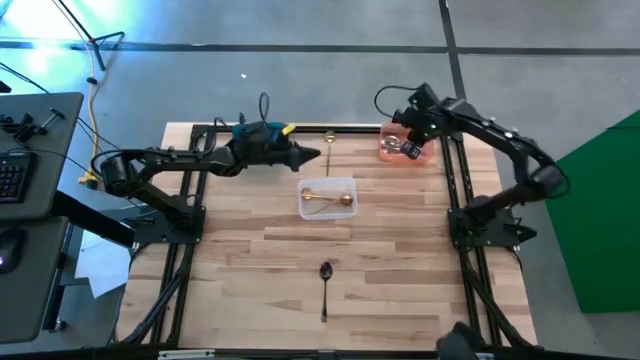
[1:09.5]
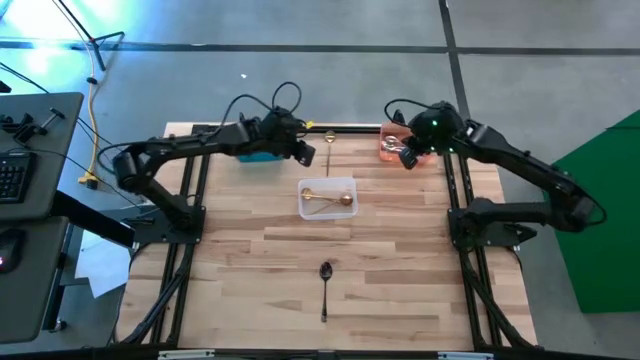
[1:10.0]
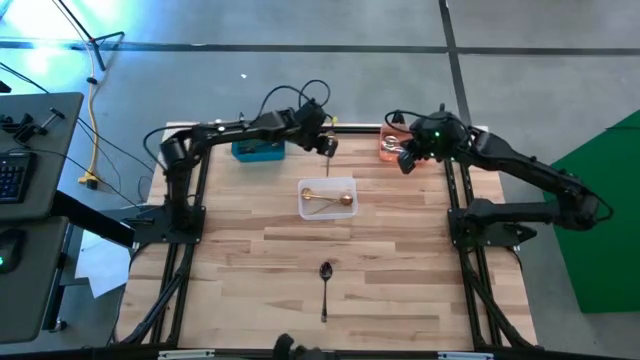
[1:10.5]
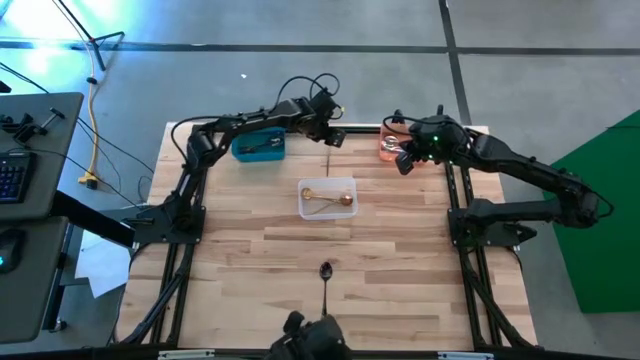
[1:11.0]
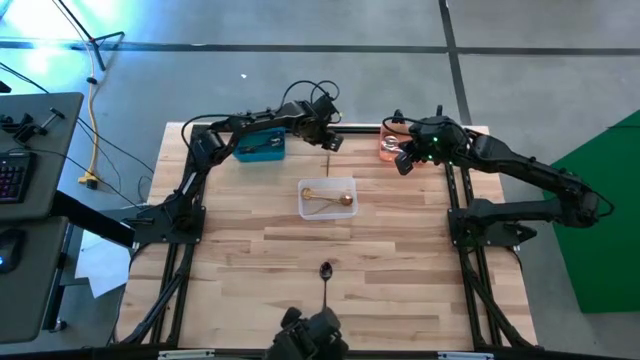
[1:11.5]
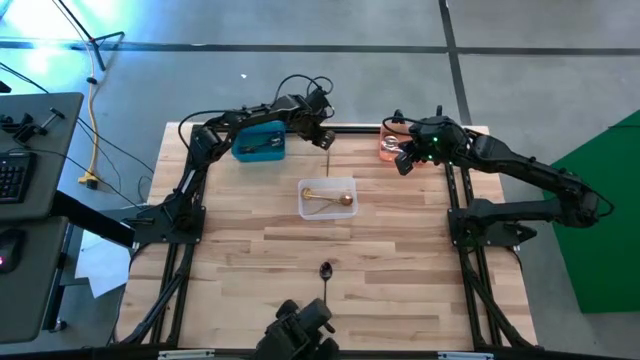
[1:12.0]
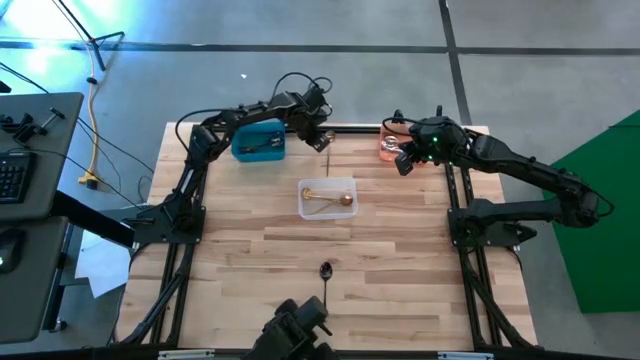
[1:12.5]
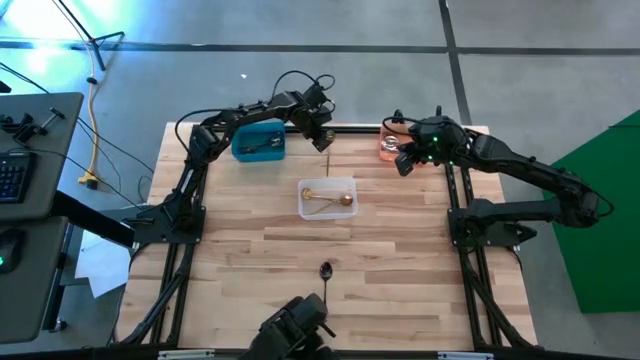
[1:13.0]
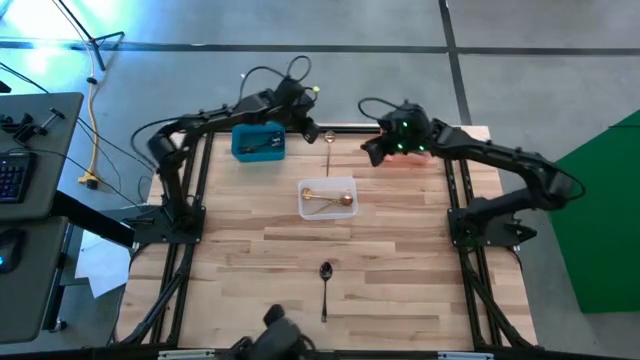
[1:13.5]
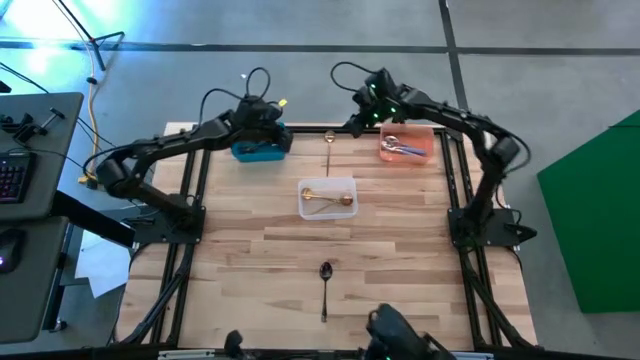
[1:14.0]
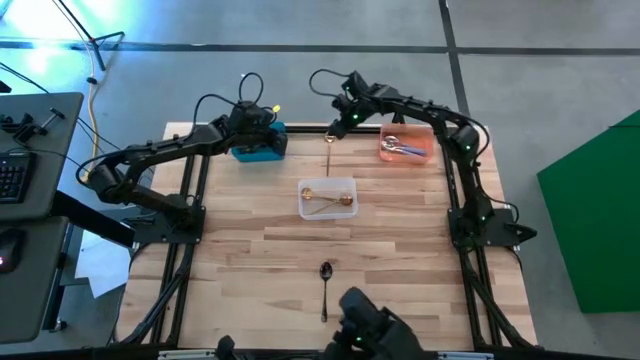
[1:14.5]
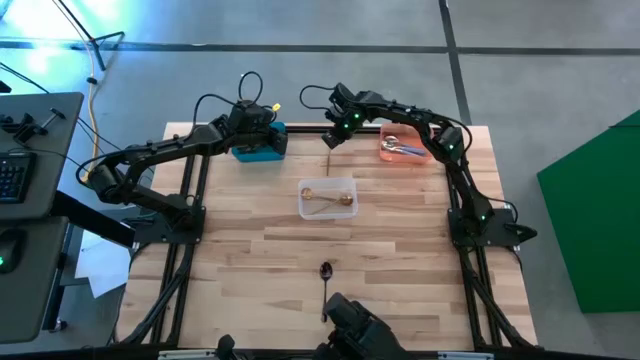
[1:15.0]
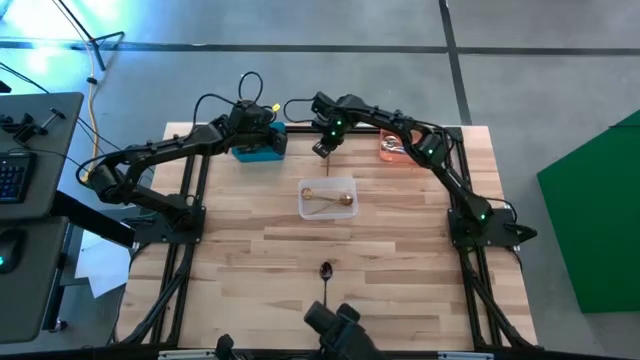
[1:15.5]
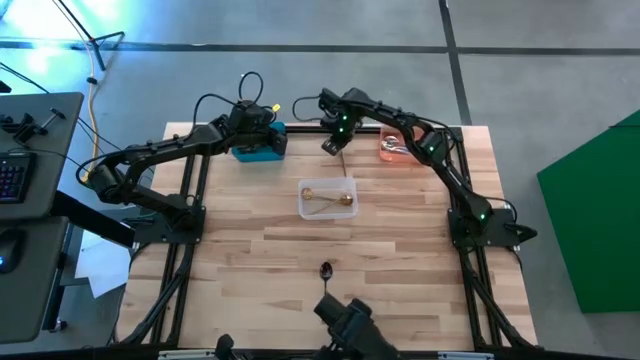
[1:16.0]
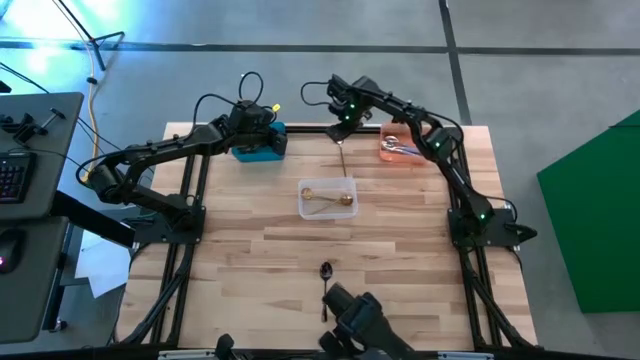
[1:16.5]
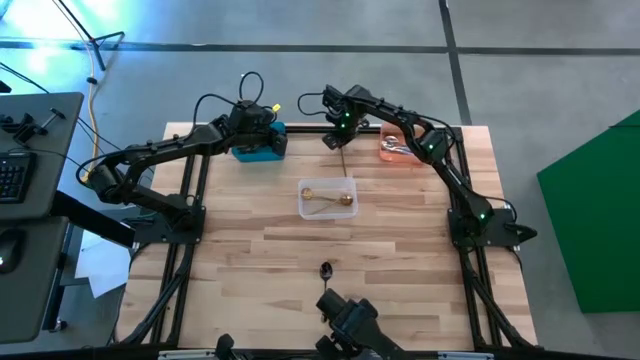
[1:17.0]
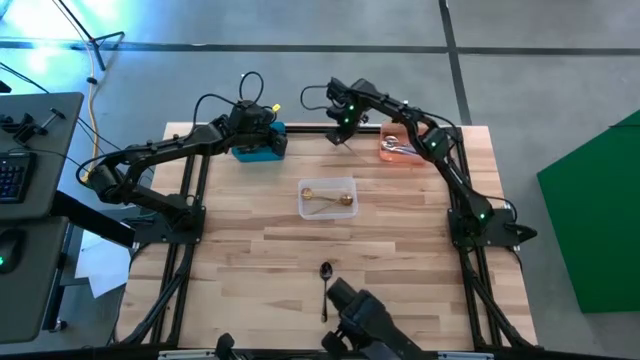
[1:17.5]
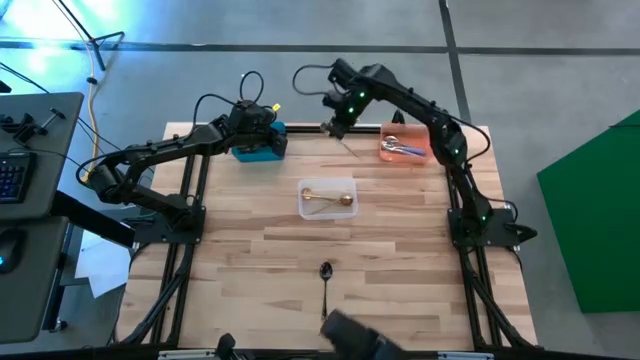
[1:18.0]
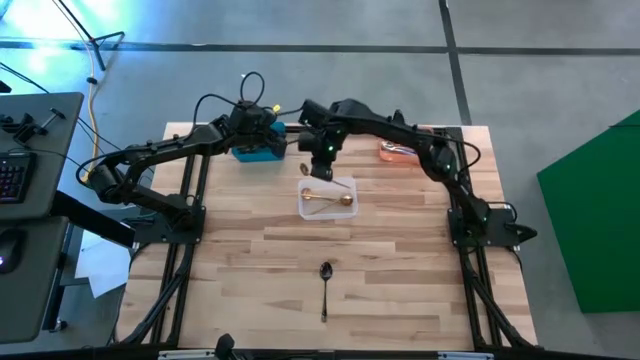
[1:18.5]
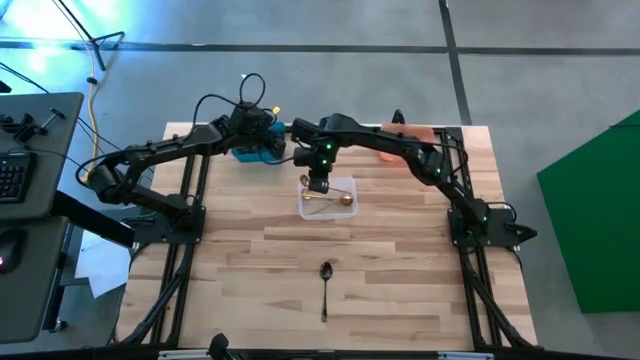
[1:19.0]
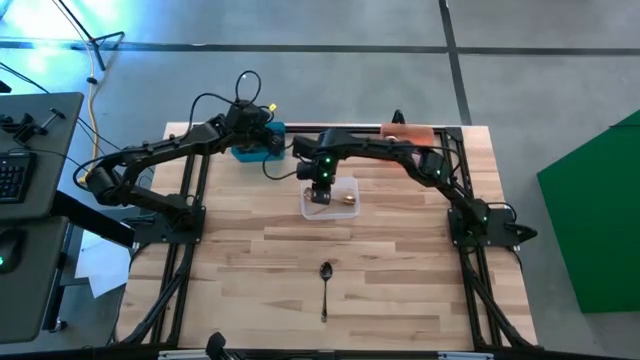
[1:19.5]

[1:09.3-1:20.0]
Task: Sort silverware by color (type)
Put the golden spoon into the white bin

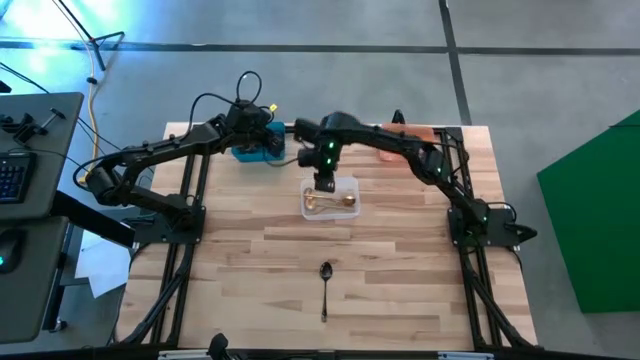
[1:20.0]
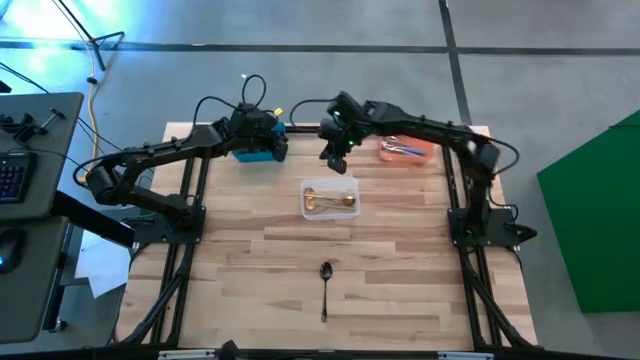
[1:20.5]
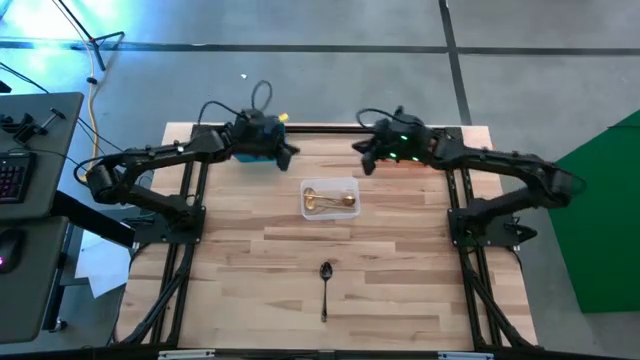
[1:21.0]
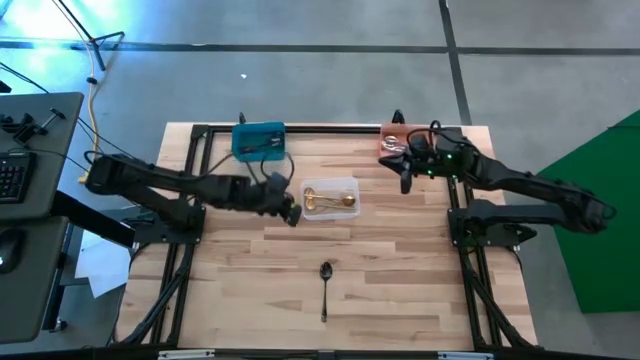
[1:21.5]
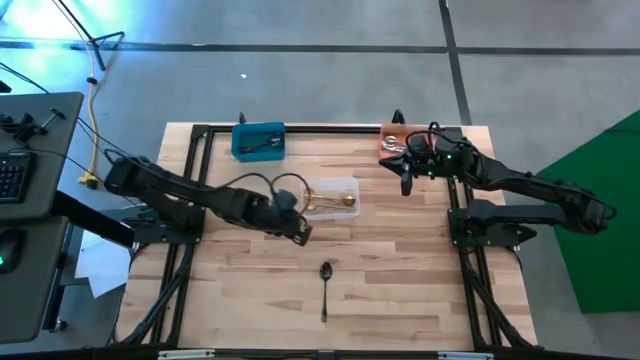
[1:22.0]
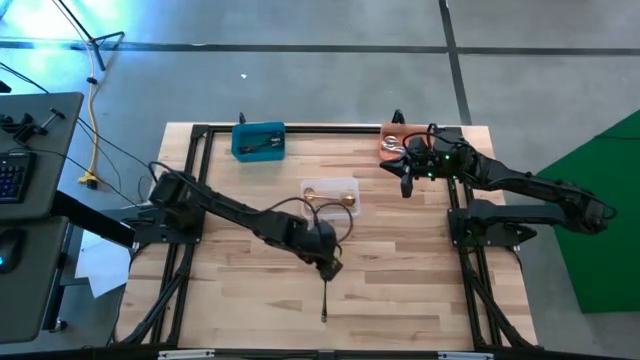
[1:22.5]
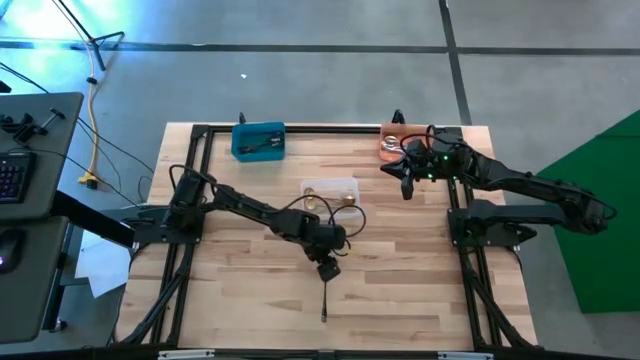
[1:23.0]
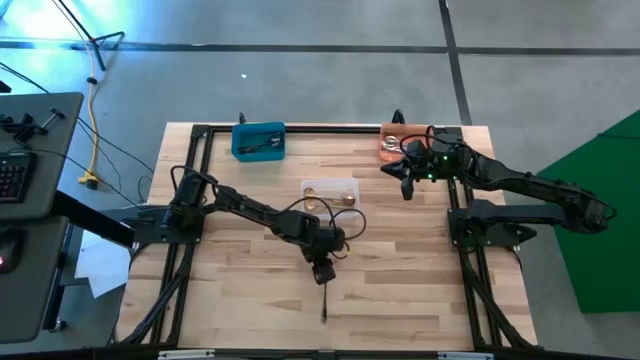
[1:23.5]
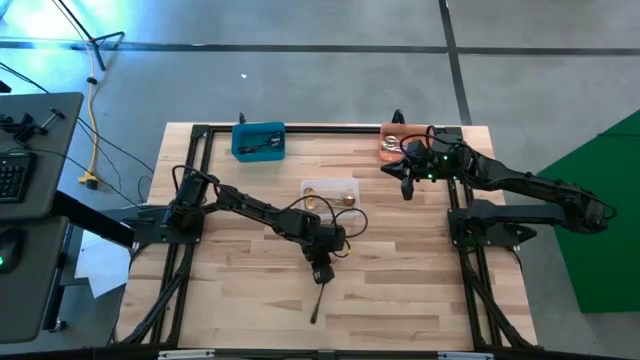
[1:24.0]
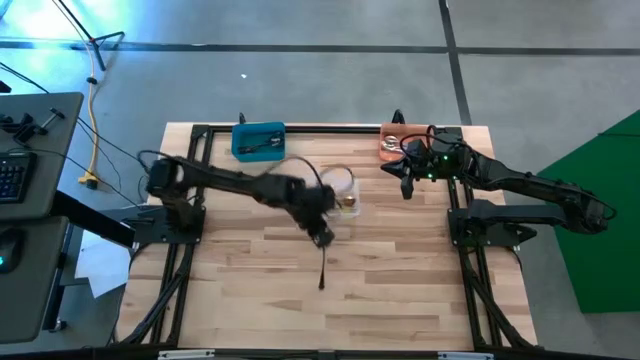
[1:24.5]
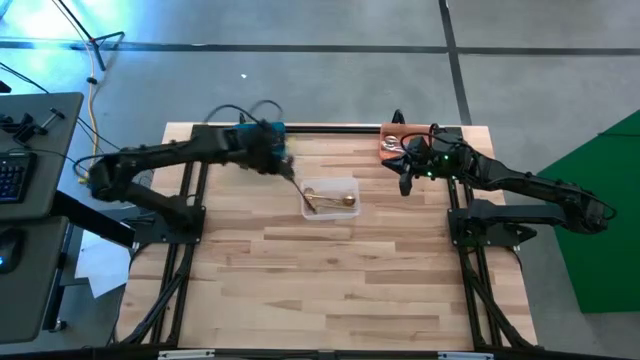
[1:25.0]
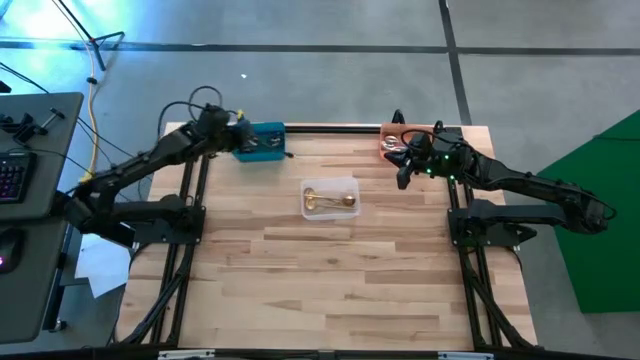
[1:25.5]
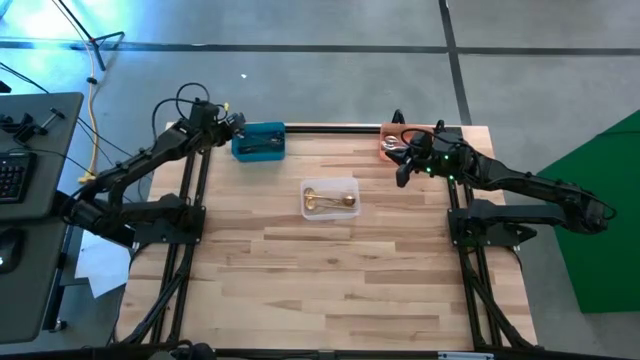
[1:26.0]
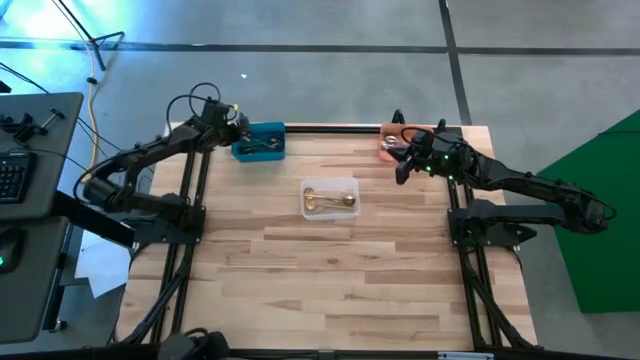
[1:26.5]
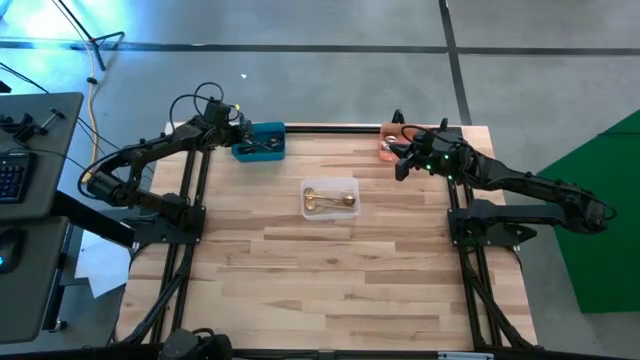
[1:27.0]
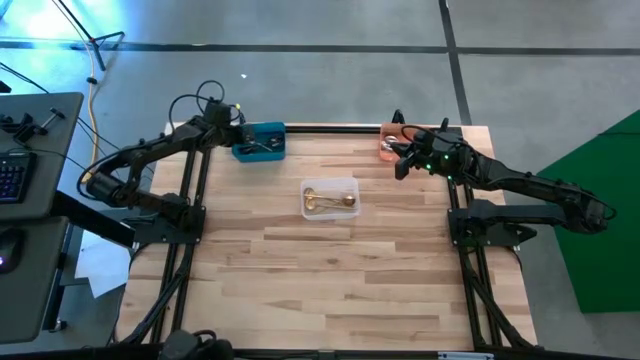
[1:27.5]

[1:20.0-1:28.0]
Put the black spoon into the blue bin

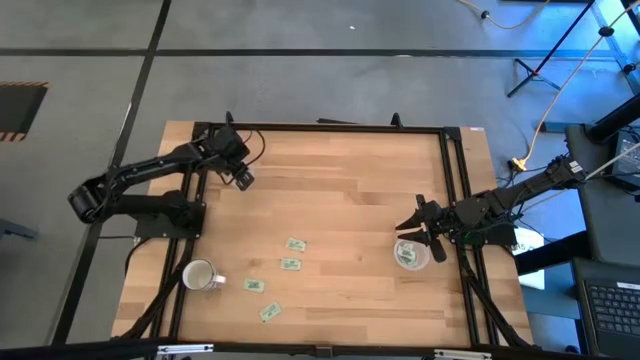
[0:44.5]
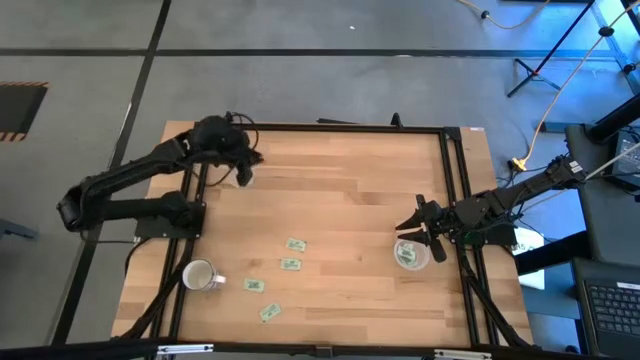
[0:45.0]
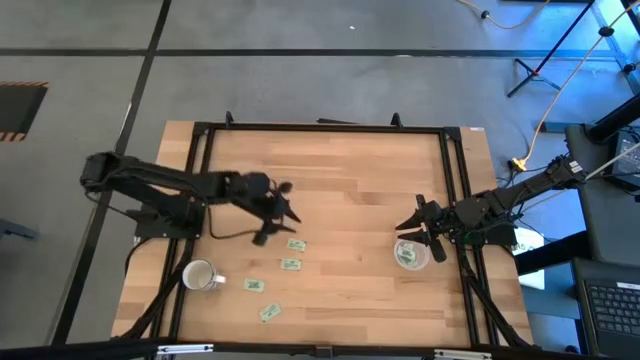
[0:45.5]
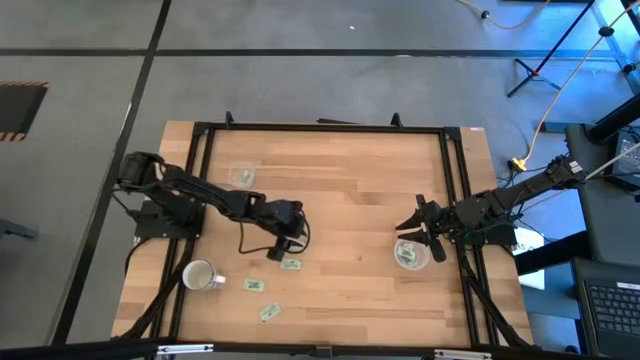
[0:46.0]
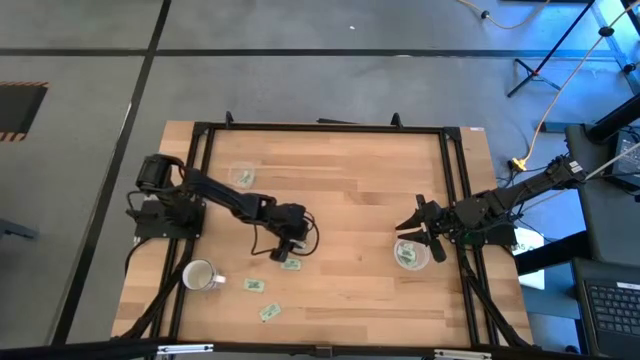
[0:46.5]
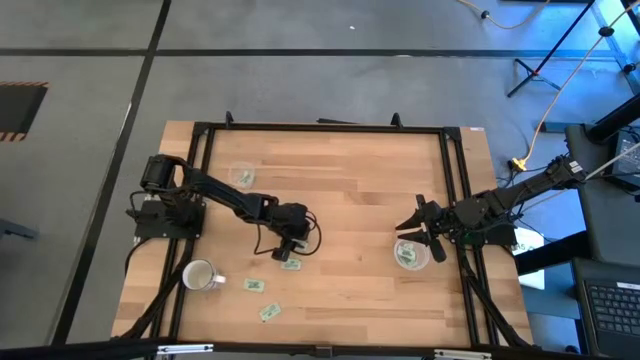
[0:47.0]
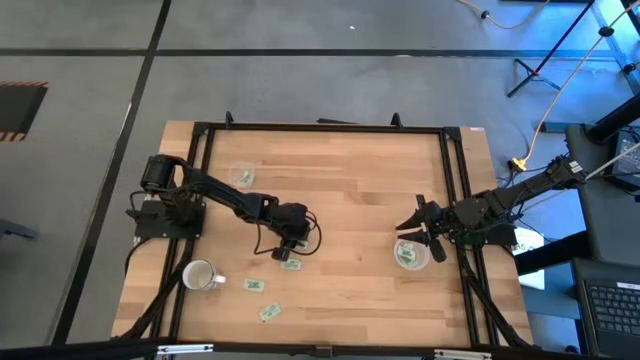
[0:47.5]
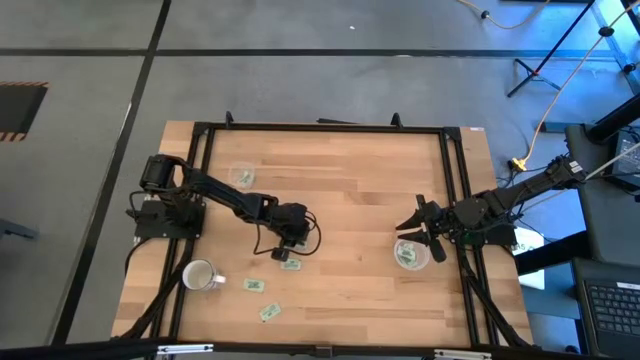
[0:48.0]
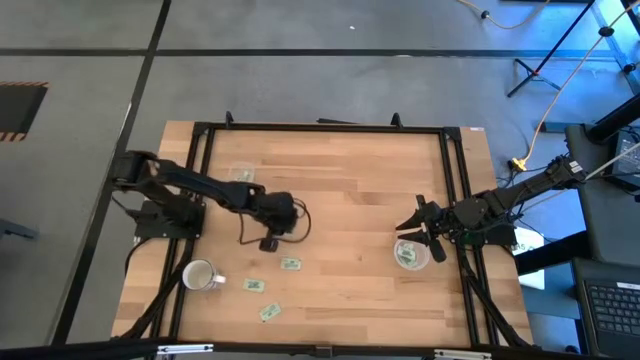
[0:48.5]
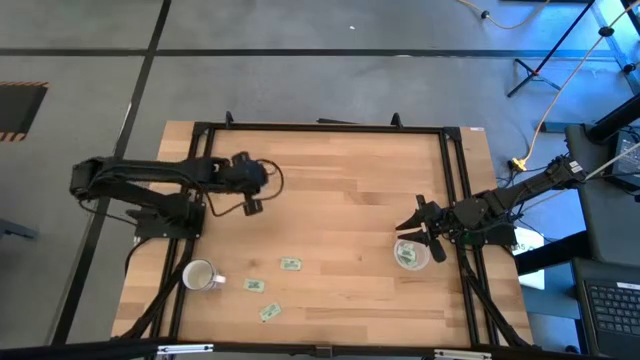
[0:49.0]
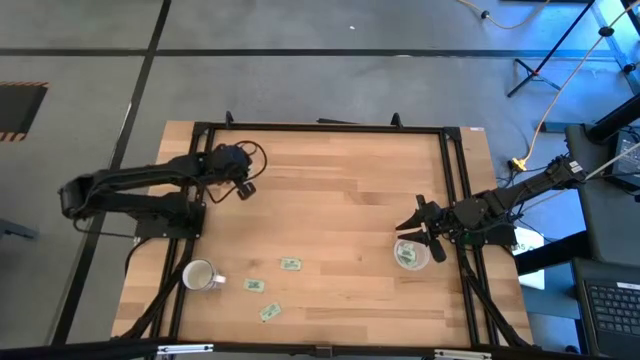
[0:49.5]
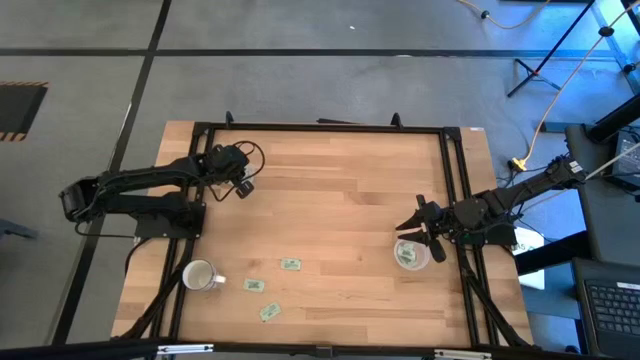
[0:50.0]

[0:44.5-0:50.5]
Task: Pick and place Stevia / Truvia into bins
Put the stevia packet into the square transparent container
